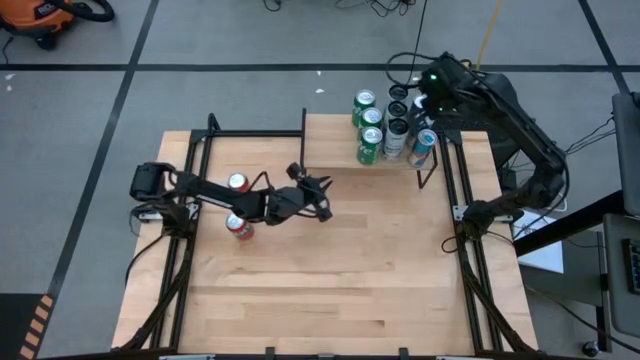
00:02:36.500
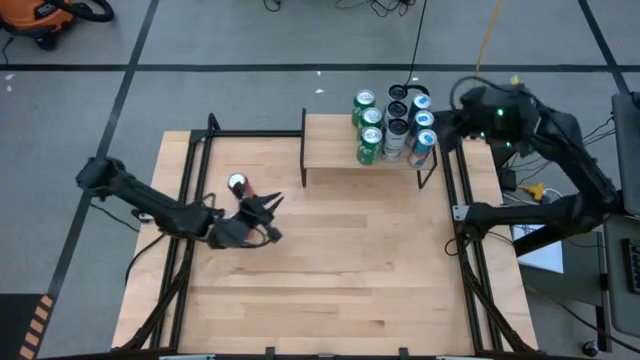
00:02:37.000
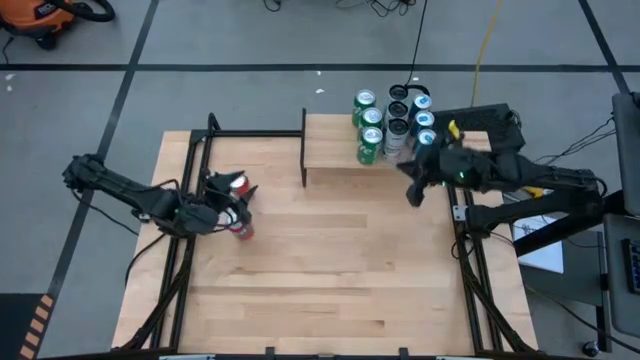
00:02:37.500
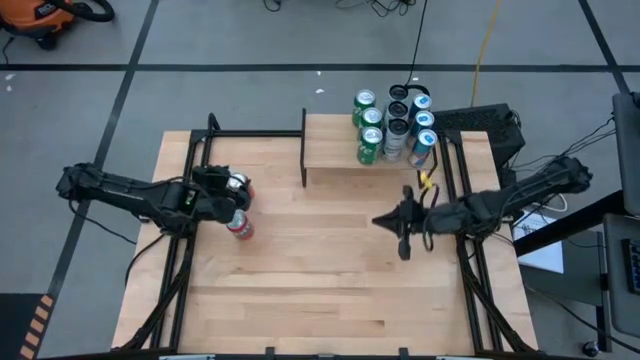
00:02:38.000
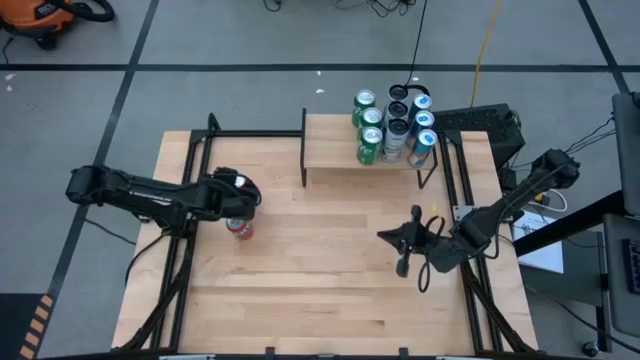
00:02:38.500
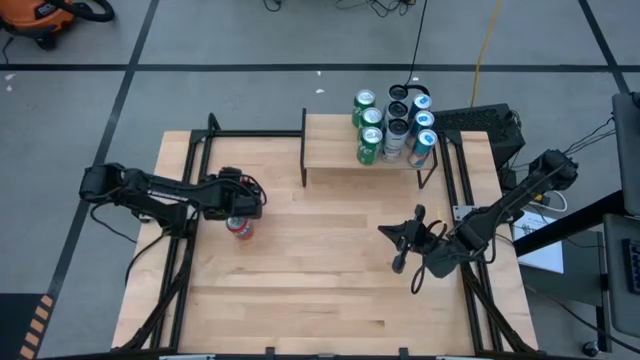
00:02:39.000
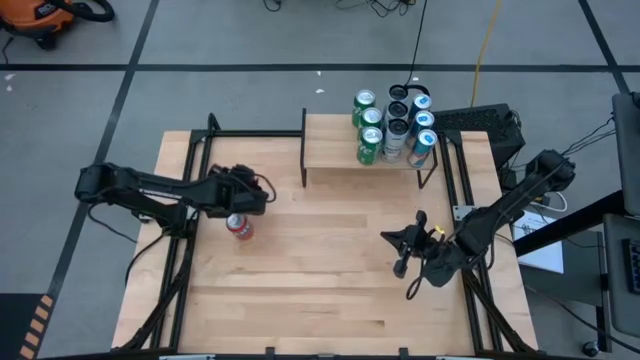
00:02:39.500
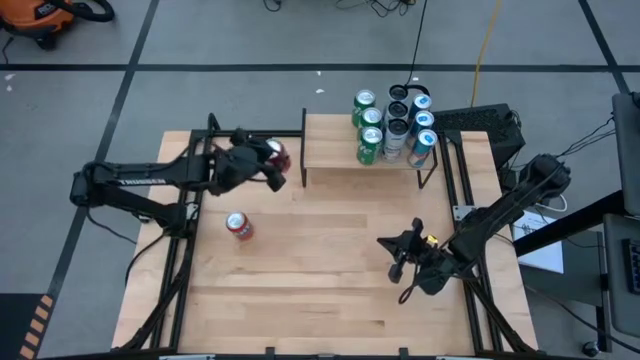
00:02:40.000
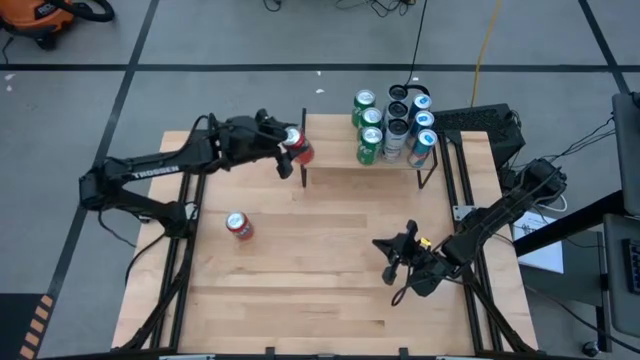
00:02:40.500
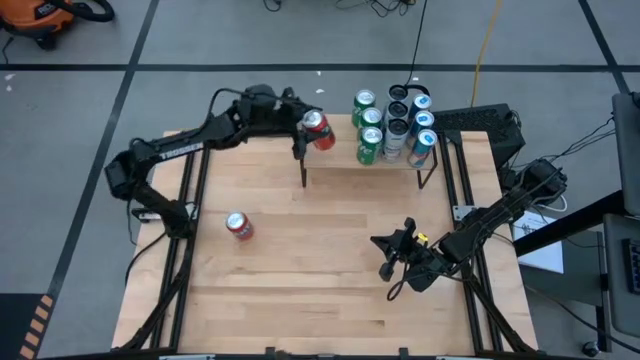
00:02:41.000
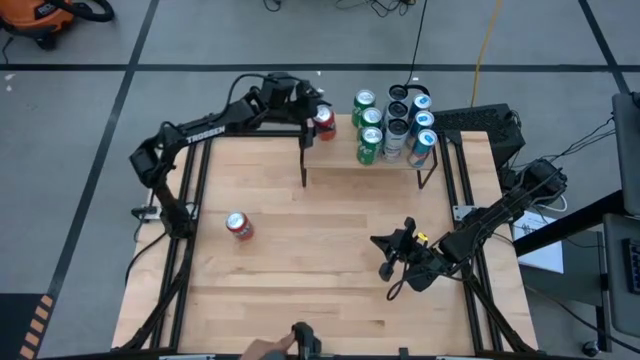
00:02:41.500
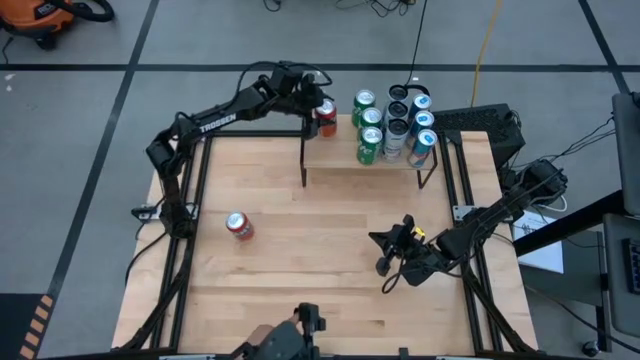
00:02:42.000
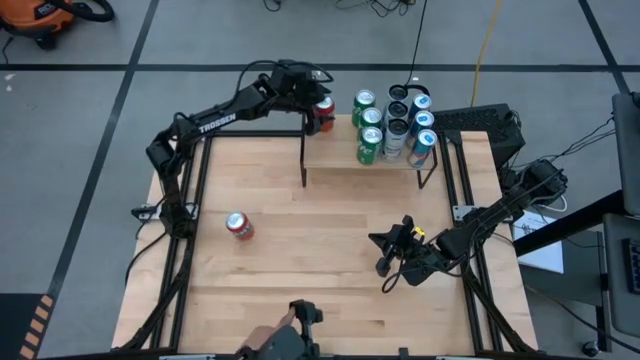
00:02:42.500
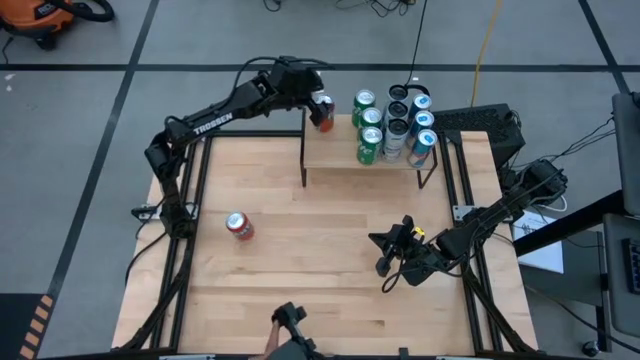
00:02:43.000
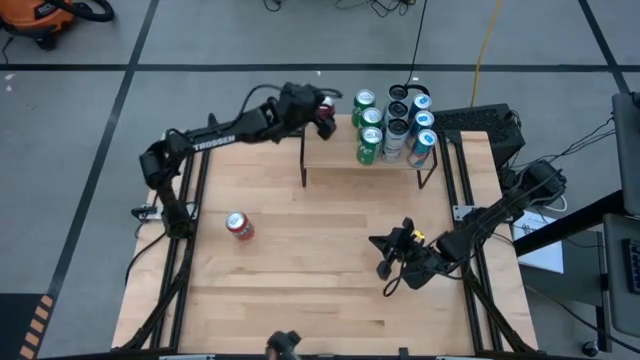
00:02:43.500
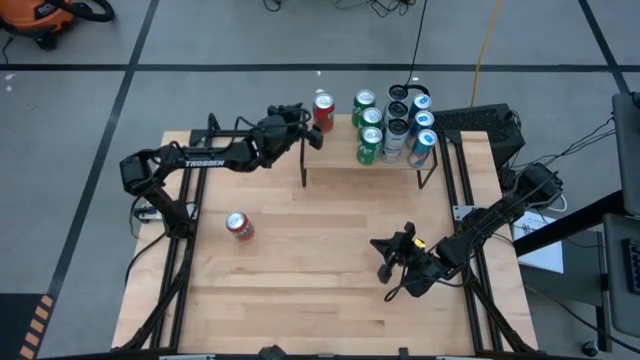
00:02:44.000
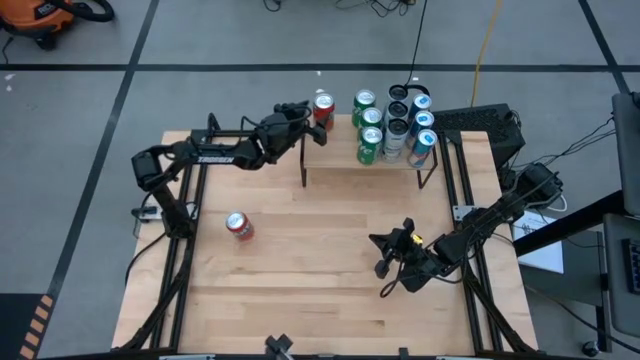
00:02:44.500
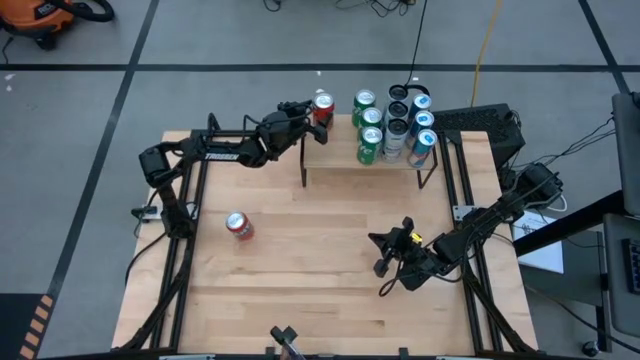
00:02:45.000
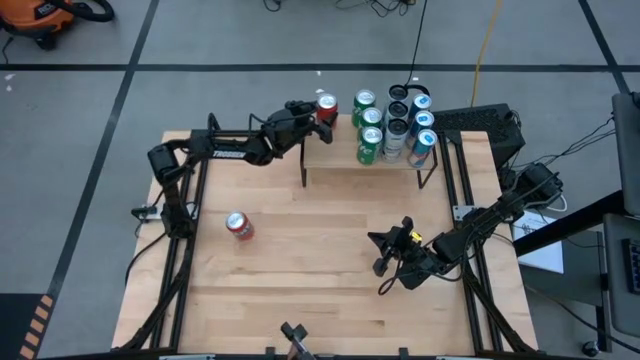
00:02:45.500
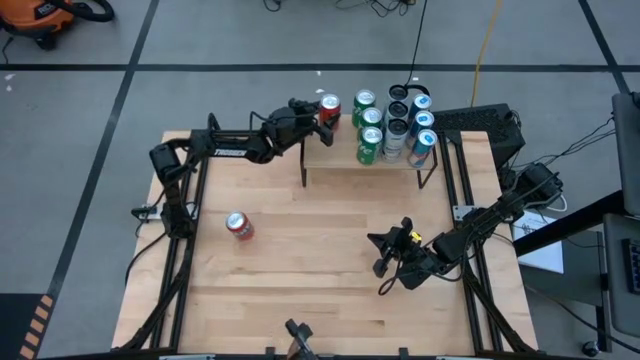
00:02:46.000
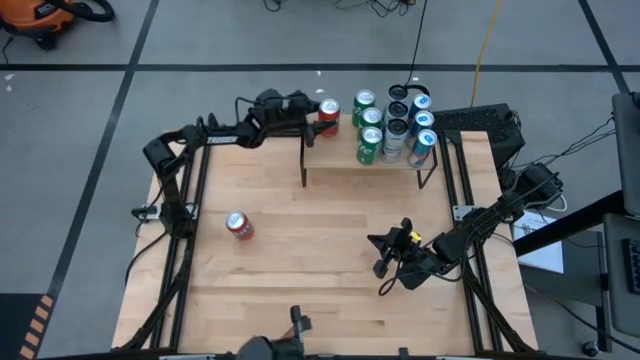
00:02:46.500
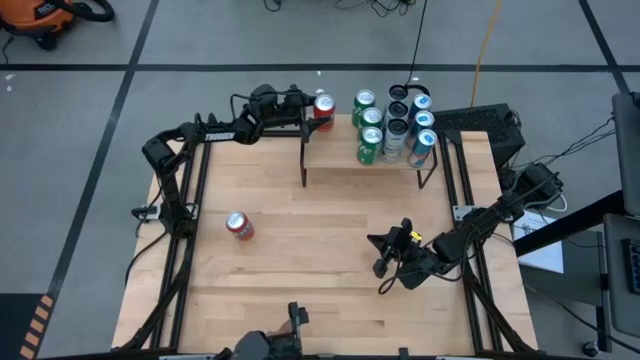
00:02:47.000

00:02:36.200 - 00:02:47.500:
Task: Place canned beverage on shelf
Put the top red soda can on the shelf

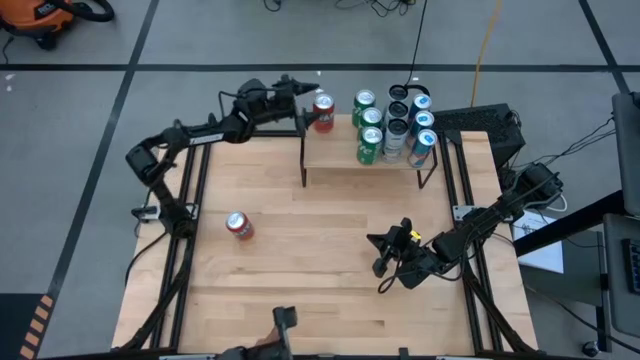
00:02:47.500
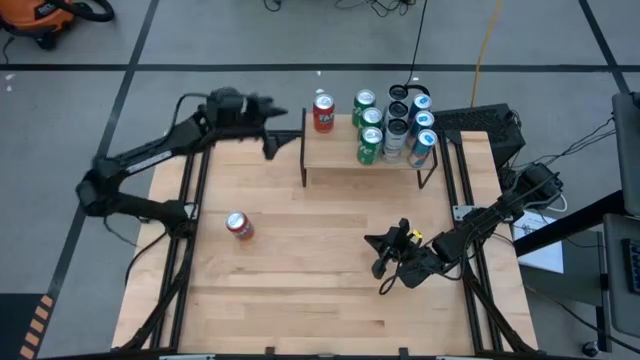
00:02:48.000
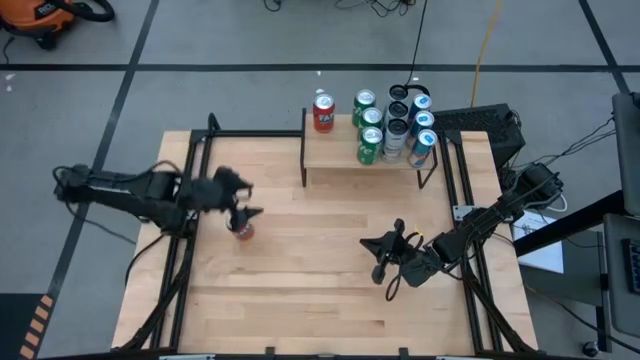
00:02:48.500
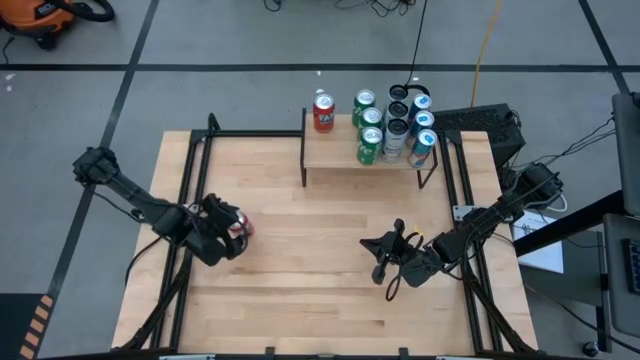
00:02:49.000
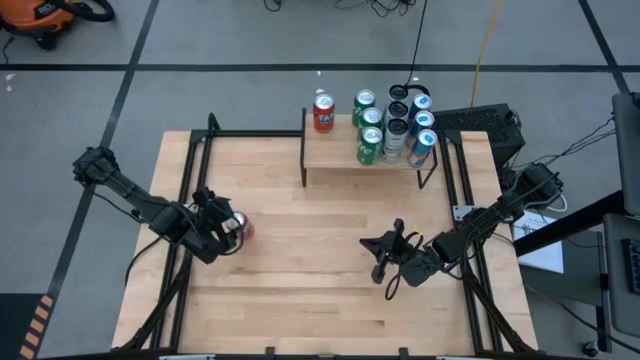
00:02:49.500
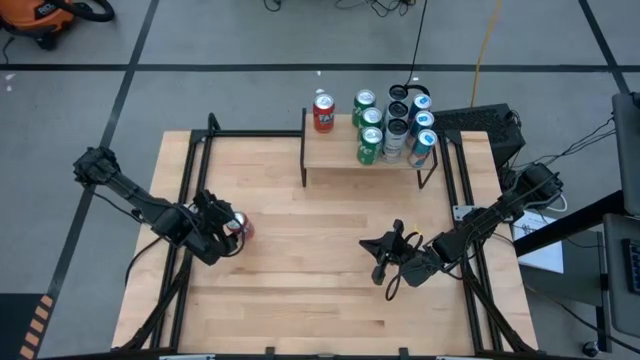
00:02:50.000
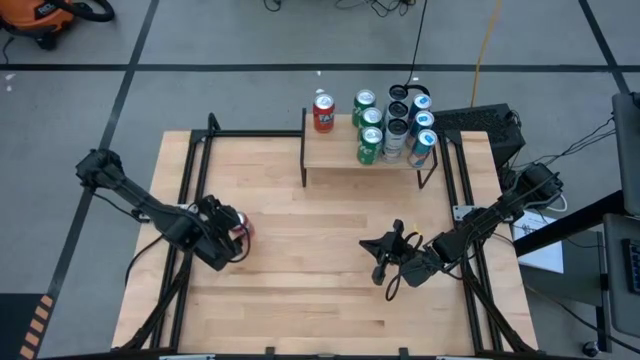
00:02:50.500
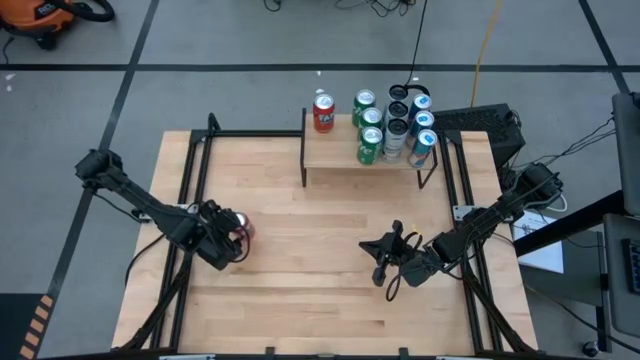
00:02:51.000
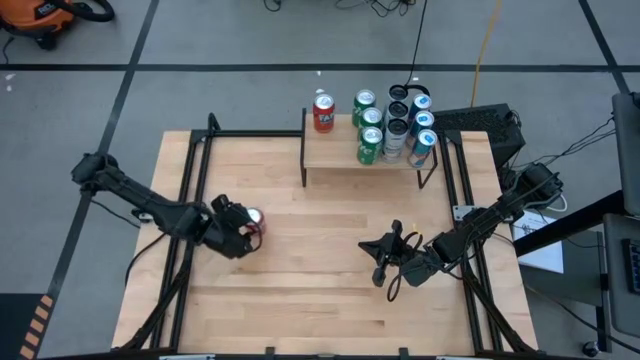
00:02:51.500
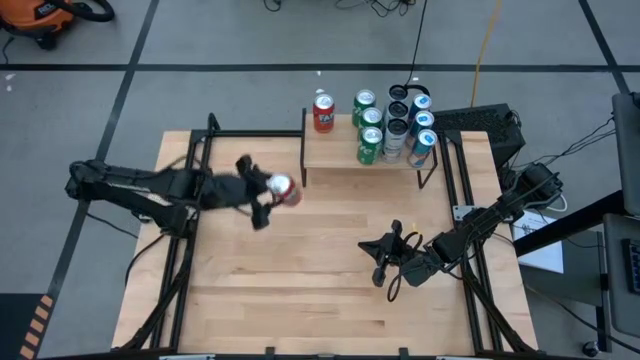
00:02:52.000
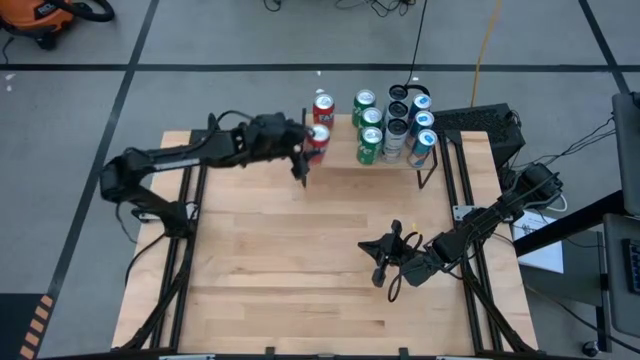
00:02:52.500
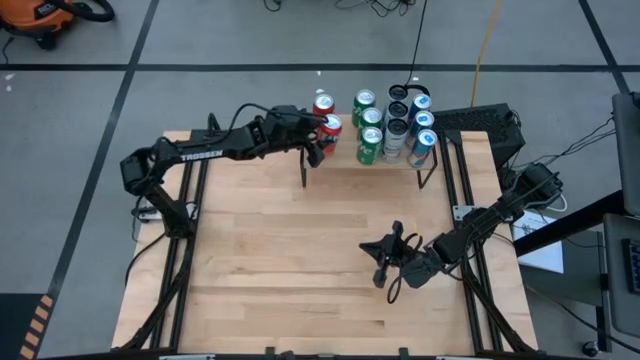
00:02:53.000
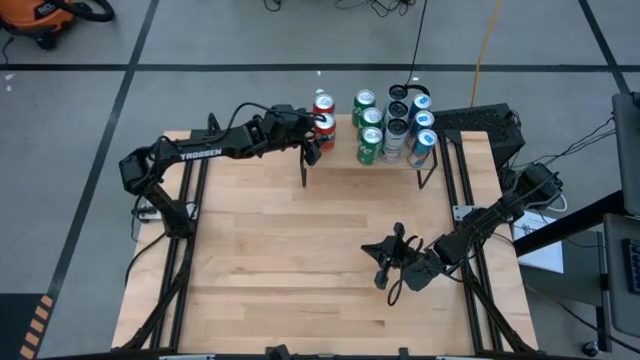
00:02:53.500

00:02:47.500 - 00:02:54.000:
Put the red soda can on the shelf aligned with the other red soda can

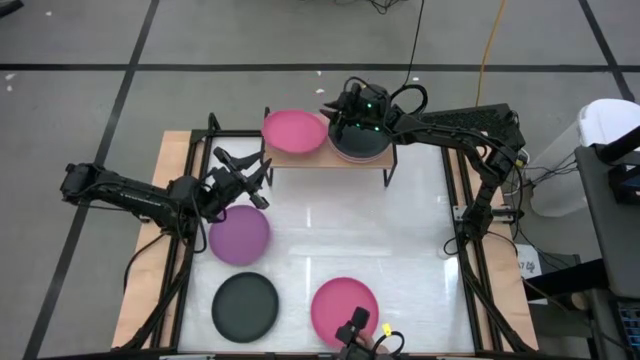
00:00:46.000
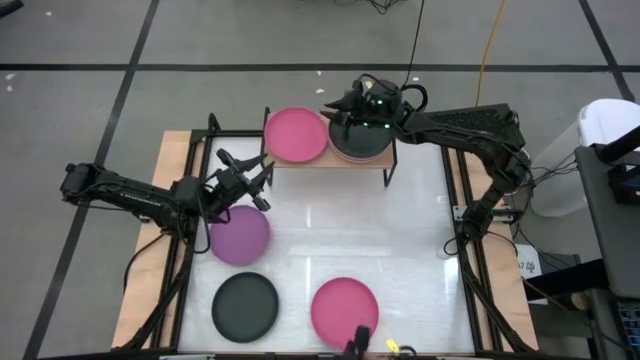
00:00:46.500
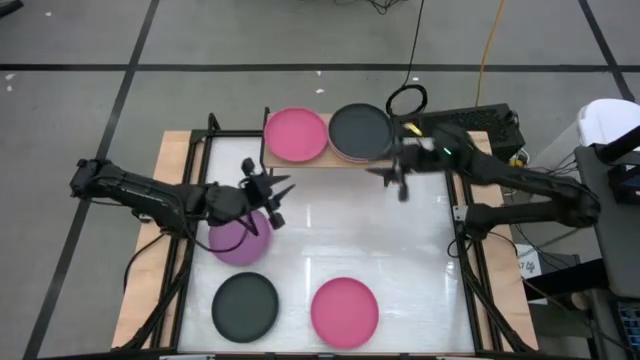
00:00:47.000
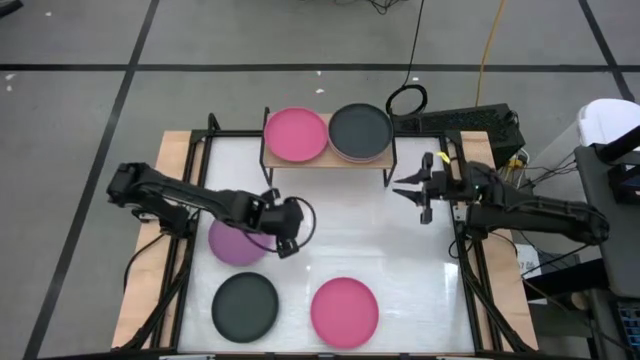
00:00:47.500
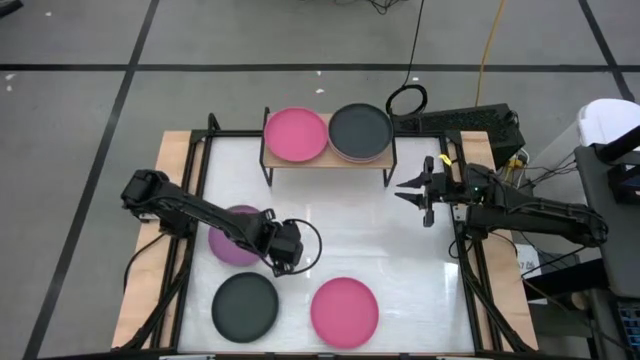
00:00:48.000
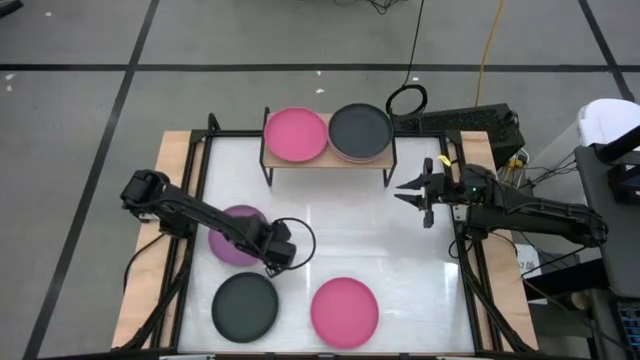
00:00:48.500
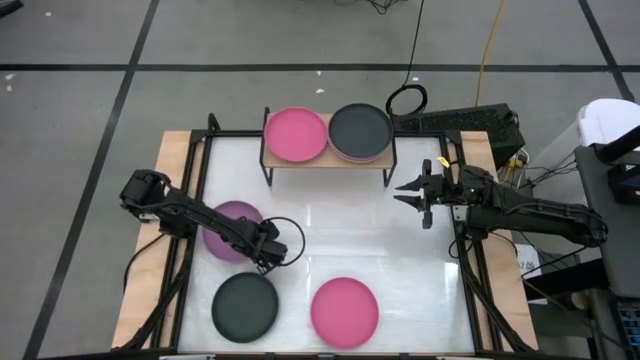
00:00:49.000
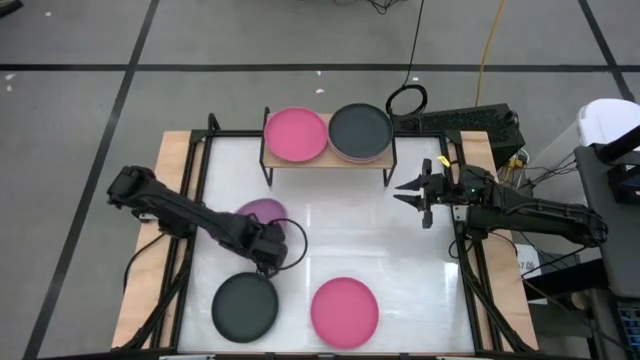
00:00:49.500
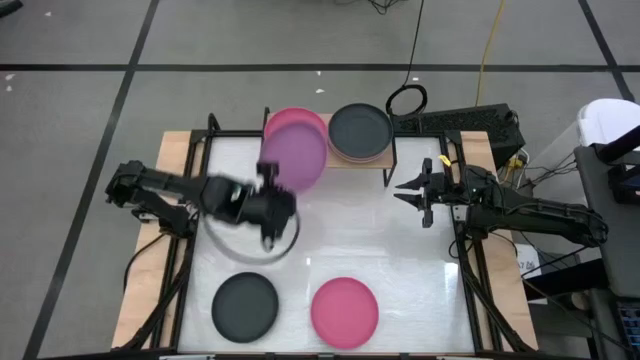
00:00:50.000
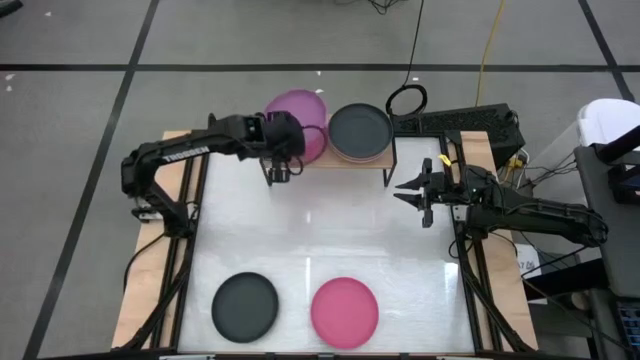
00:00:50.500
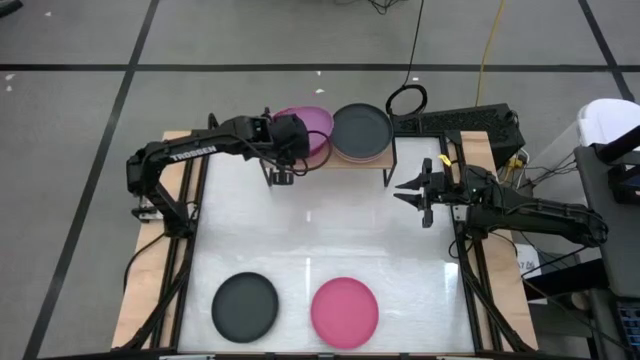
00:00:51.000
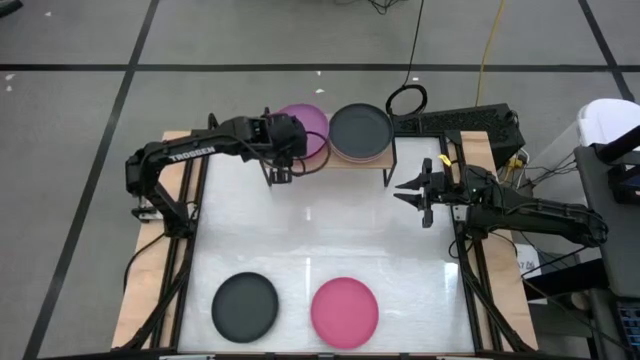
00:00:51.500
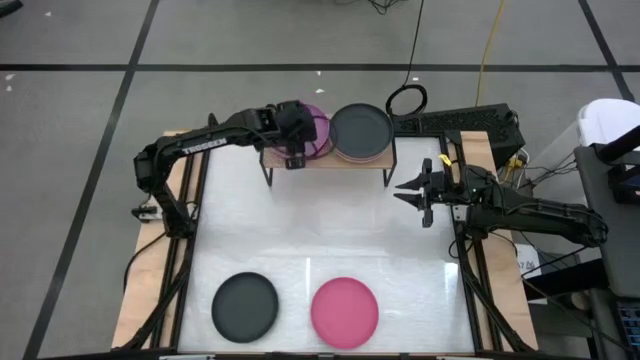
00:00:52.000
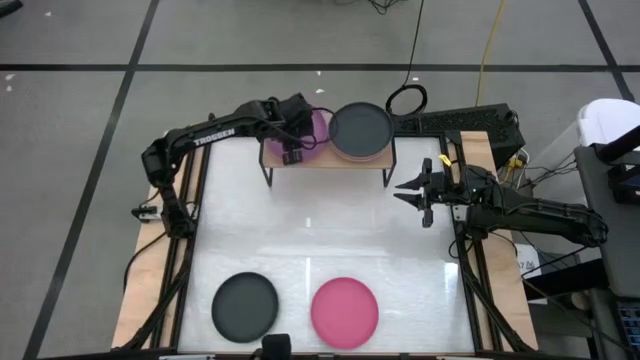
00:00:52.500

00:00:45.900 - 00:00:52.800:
Task: Place and stack plates onto a shelf
Stack the purple plate on top of the pink plate on the shelf
